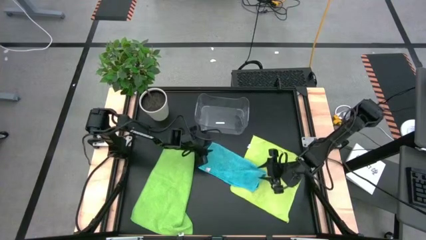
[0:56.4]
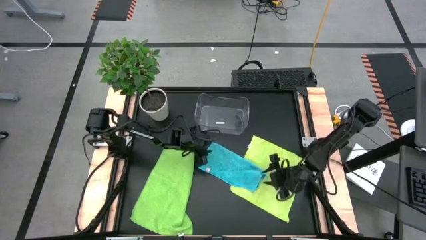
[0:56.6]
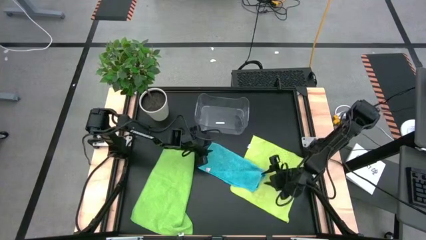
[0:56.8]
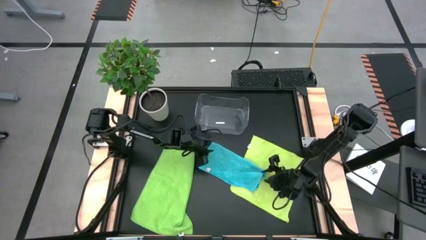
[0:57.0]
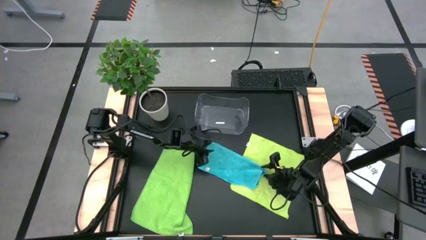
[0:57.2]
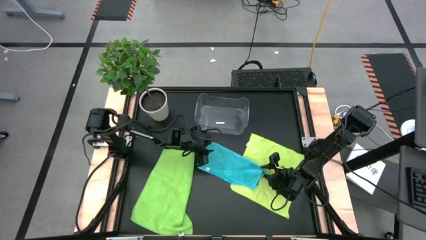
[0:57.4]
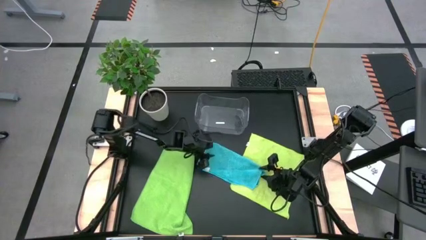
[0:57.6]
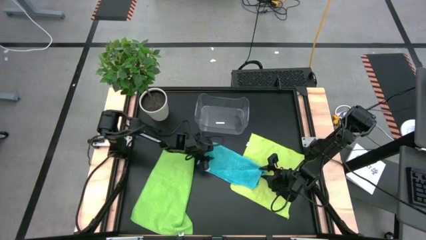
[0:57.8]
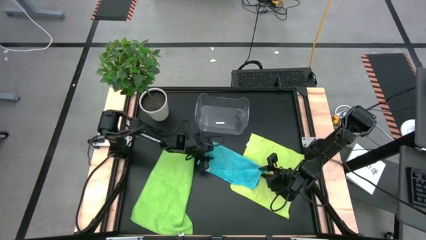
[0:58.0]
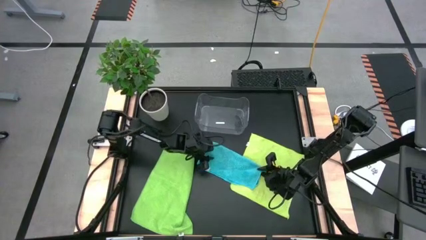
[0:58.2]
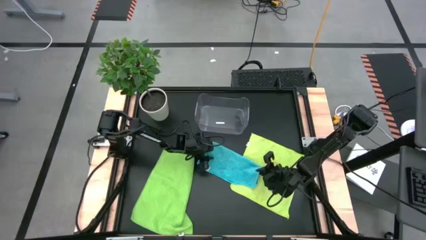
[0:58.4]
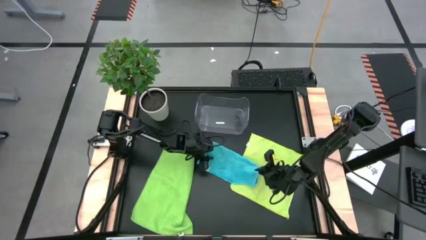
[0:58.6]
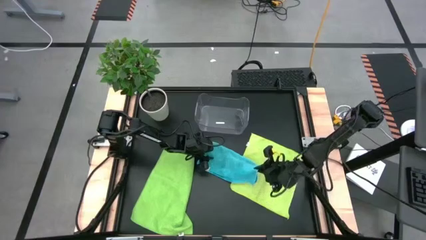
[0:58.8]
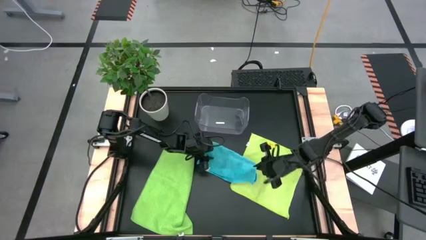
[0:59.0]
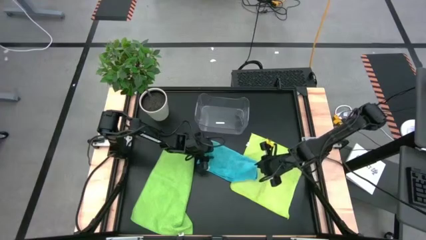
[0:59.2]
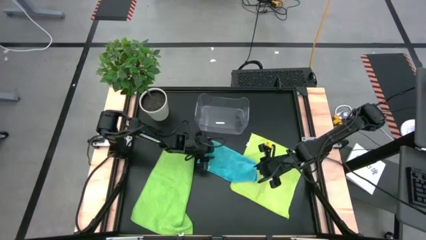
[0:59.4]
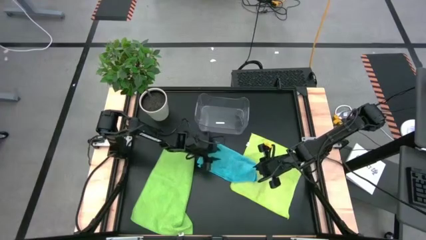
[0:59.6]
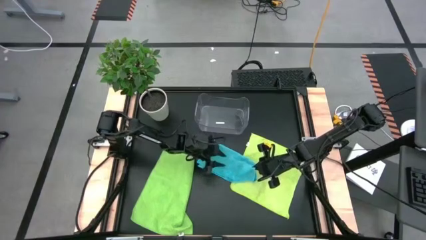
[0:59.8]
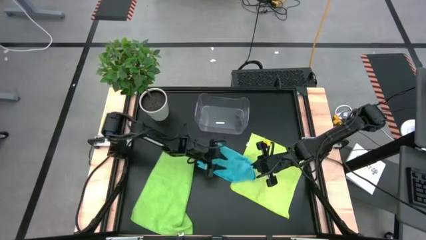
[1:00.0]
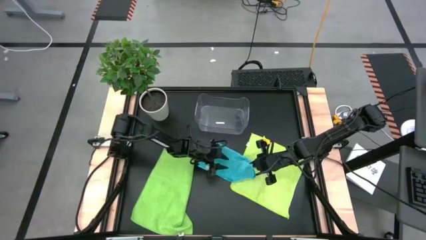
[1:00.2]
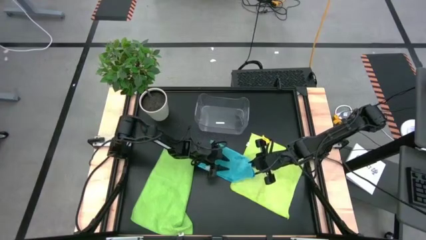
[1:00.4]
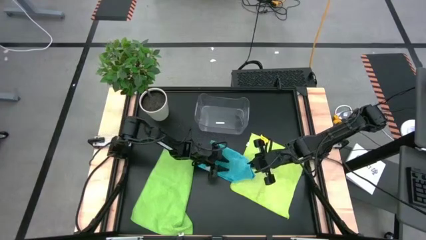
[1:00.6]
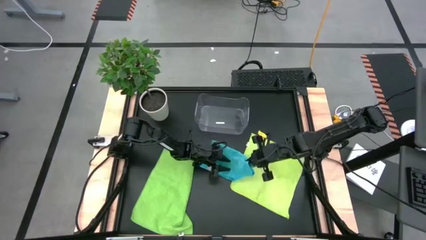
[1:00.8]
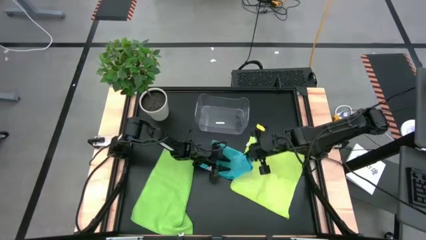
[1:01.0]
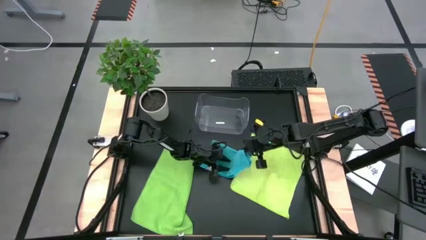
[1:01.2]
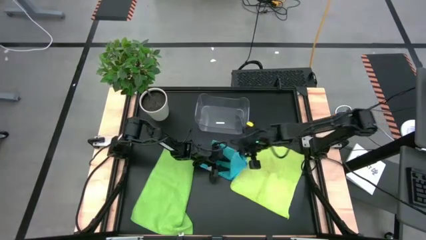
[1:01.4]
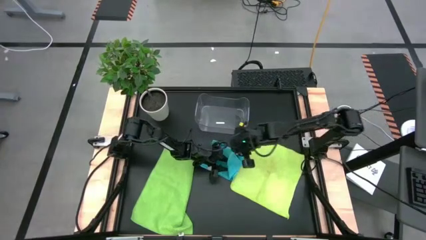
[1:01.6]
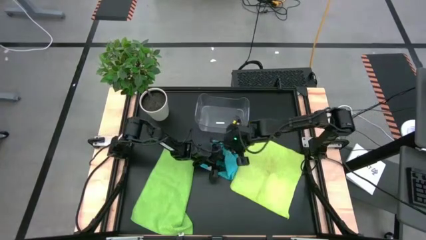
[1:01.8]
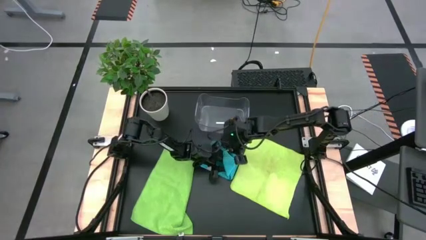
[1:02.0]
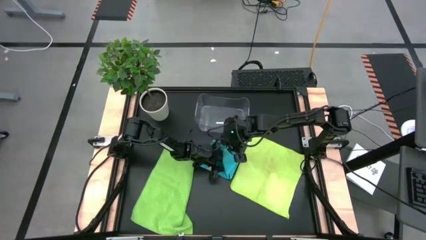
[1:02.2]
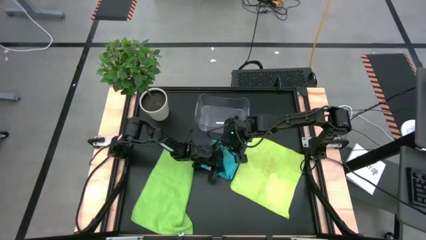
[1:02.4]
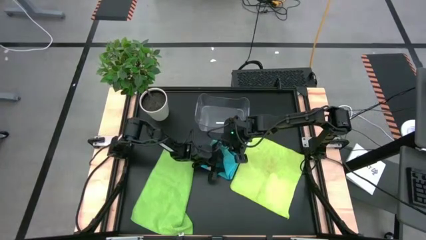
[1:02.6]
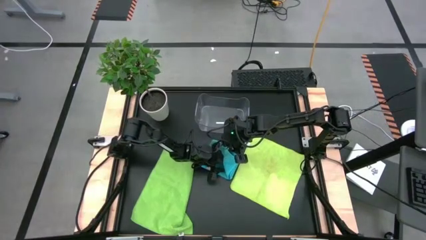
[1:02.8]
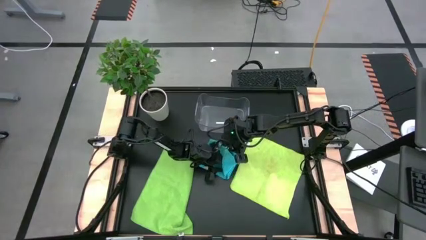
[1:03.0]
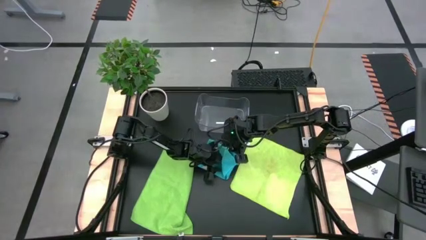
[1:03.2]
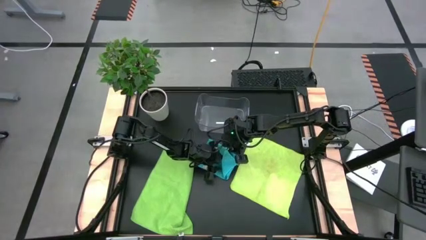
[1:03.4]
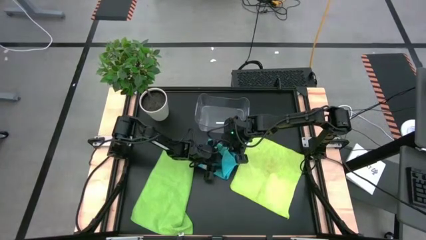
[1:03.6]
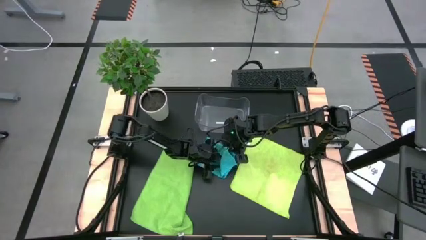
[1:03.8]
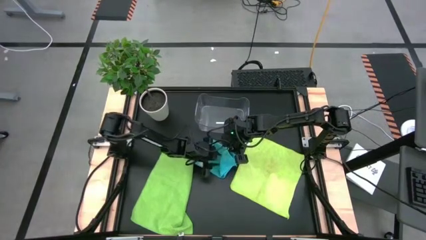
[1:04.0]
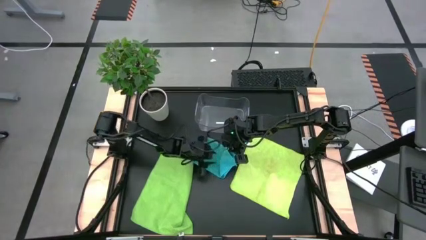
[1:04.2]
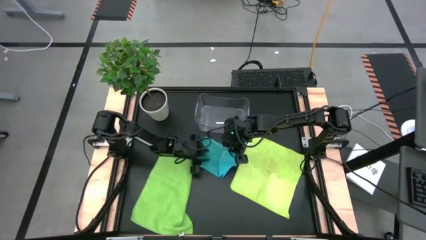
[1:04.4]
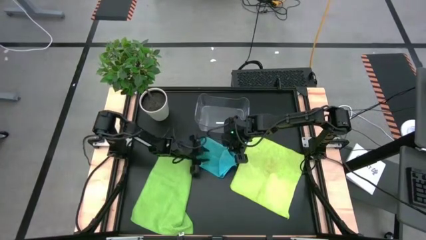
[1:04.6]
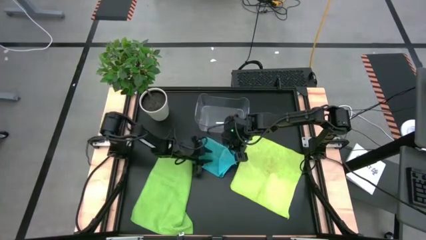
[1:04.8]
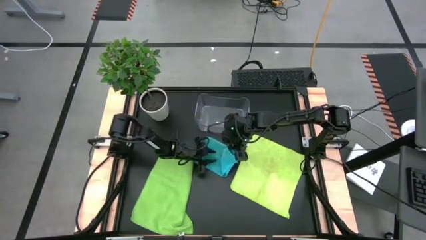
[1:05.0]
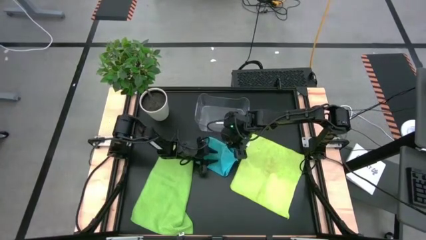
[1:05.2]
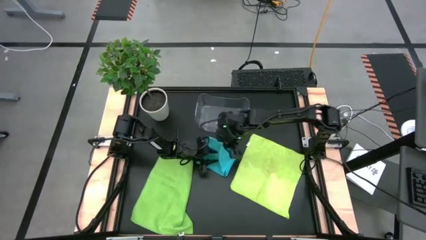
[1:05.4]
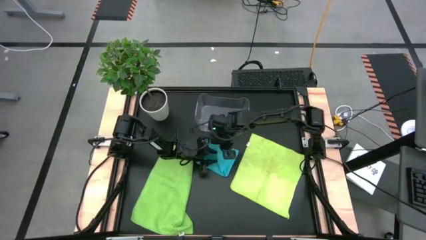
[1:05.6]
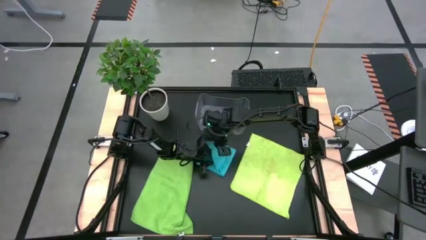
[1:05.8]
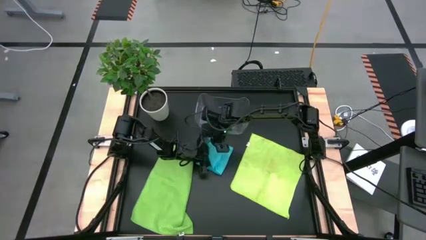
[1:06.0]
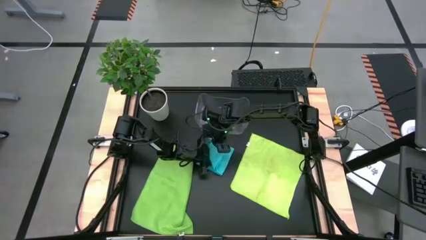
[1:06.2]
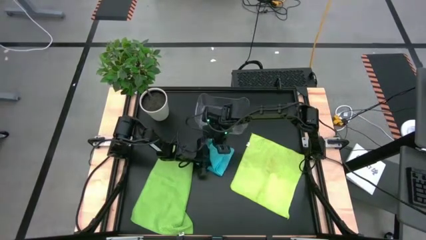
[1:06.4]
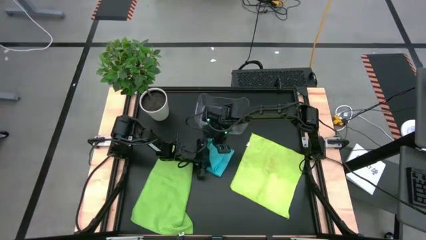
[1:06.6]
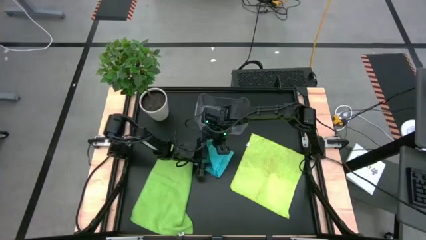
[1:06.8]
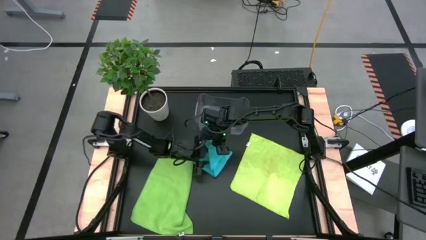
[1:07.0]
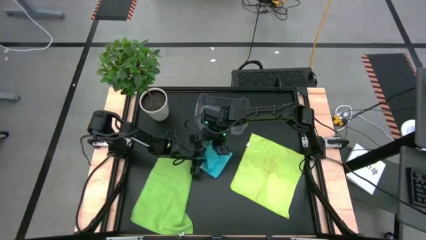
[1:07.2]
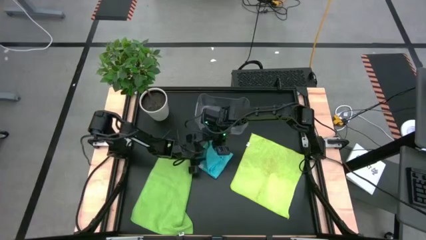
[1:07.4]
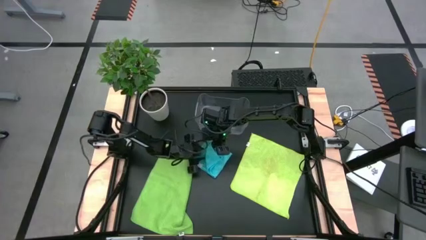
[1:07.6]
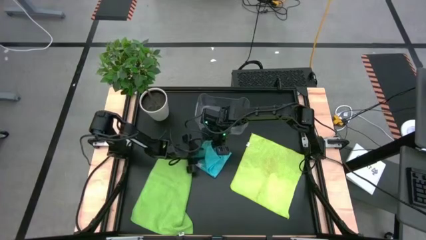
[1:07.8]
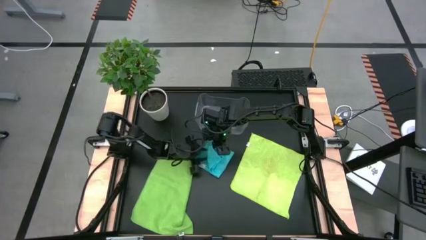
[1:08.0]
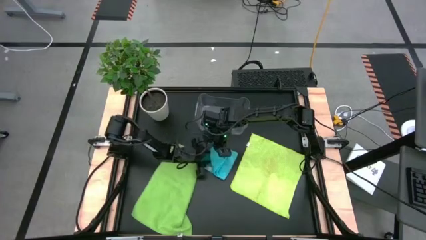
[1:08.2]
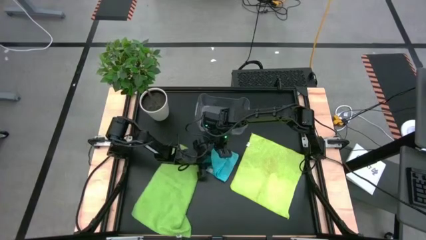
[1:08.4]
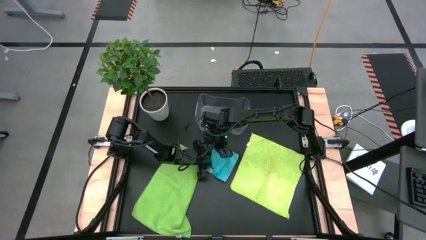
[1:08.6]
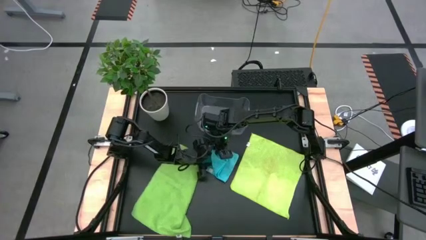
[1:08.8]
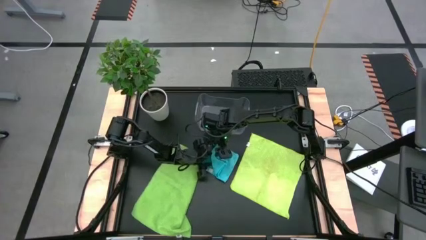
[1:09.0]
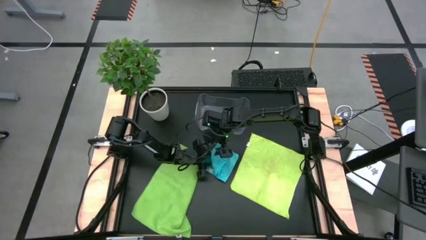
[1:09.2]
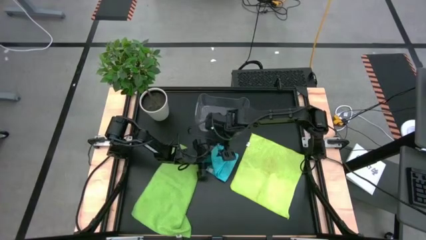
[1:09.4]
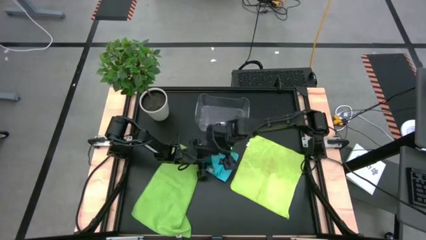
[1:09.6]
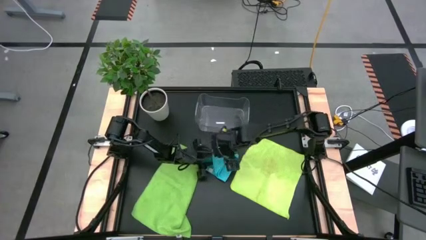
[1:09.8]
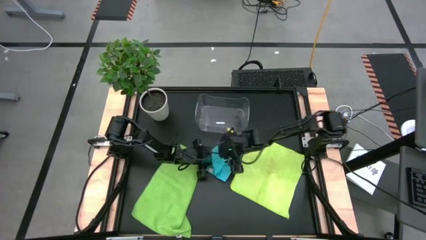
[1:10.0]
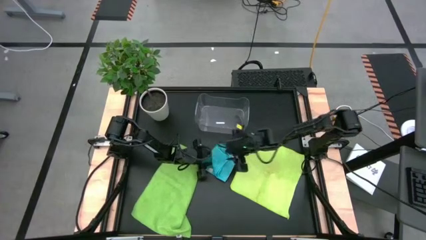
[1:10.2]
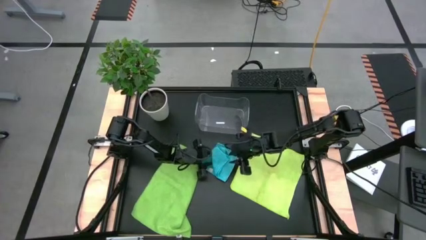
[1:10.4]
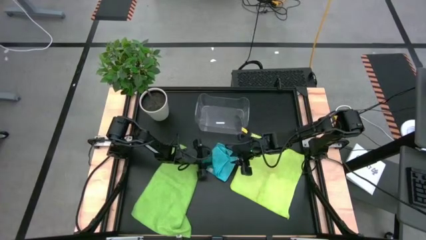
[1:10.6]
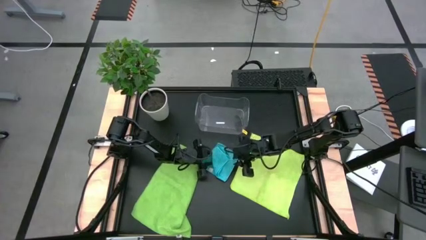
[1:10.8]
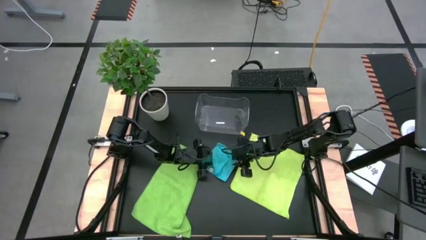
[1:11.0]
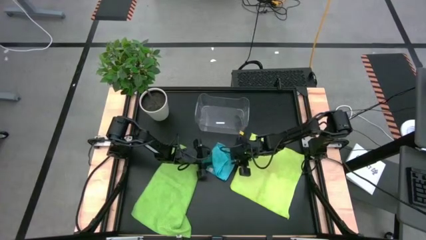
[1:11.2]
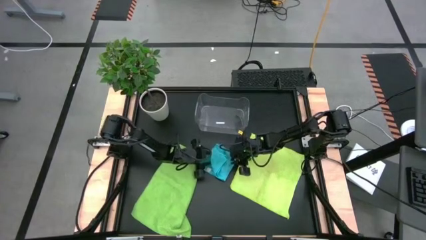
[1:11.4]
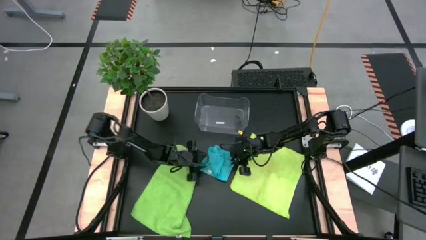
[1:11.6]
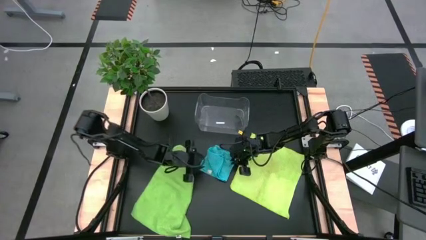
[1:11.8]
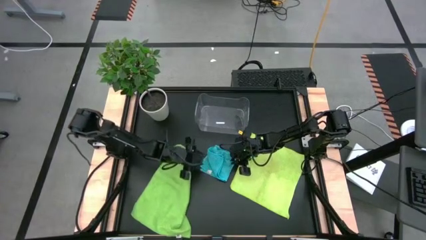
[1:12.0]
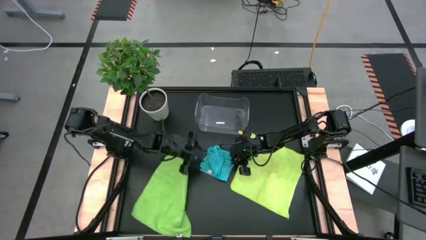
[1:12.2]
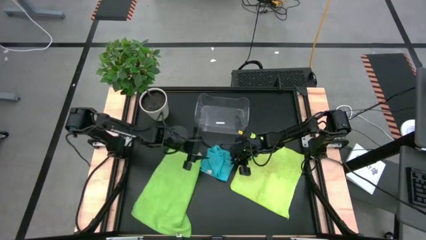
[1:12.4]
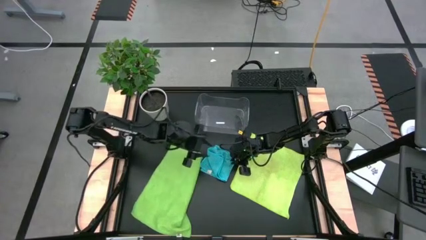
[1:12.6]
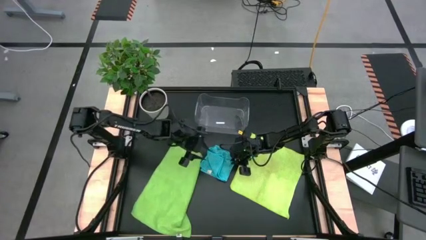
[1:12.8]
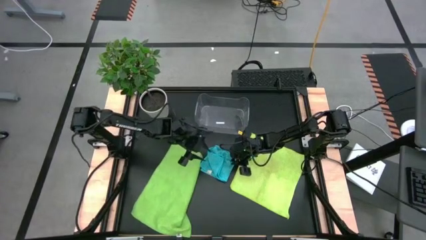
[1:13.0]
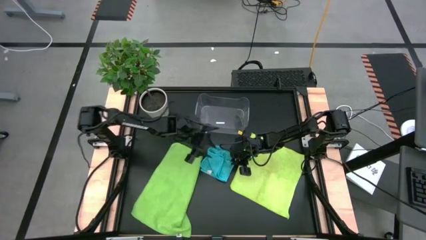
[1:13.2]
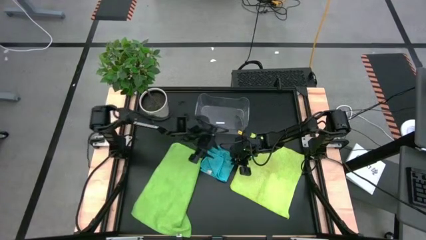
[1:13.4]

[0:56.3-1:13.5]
Task: Fold microfiber towels
Fold the blue microfiber cloth
